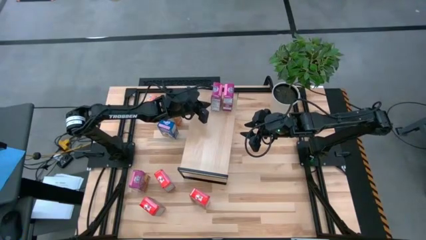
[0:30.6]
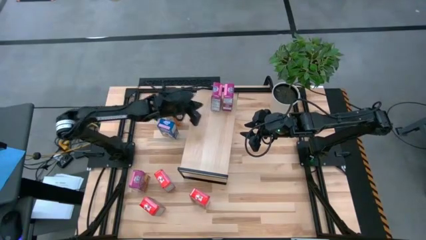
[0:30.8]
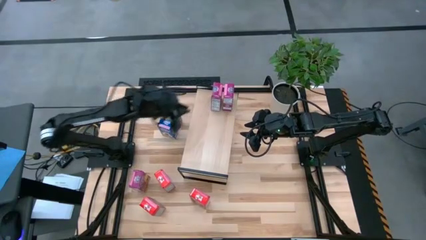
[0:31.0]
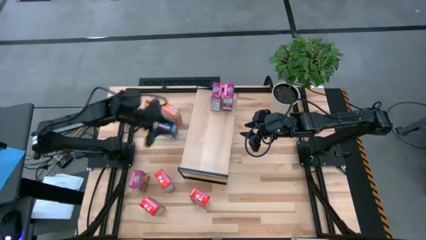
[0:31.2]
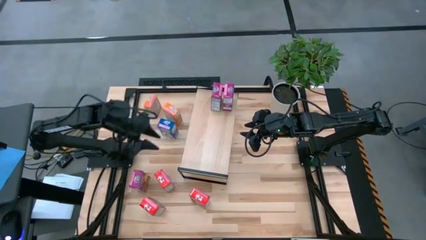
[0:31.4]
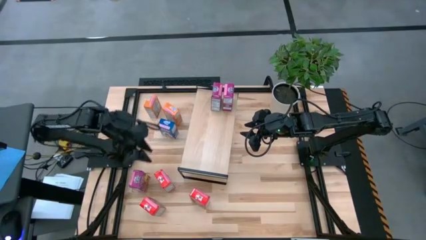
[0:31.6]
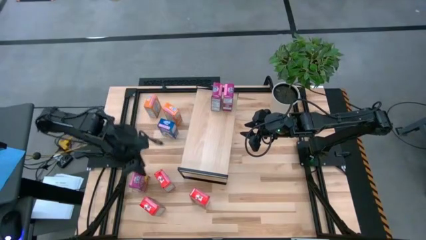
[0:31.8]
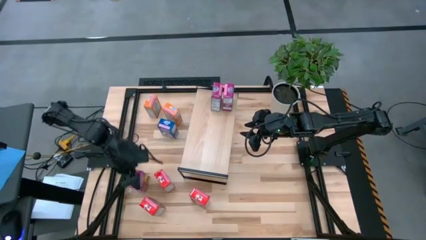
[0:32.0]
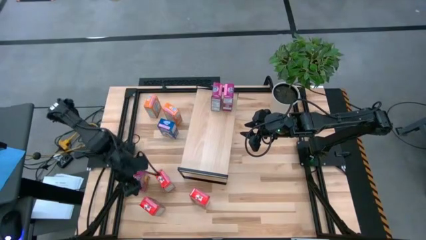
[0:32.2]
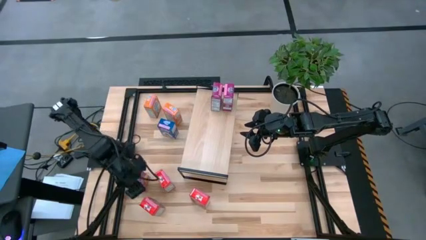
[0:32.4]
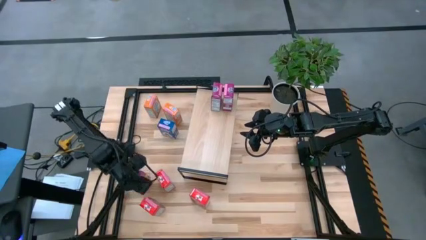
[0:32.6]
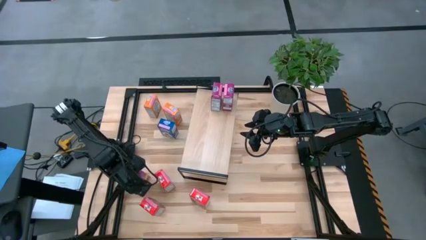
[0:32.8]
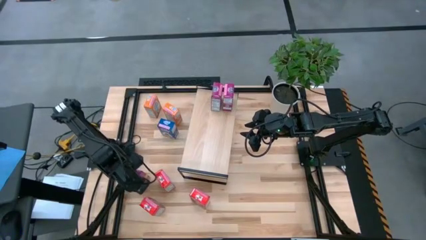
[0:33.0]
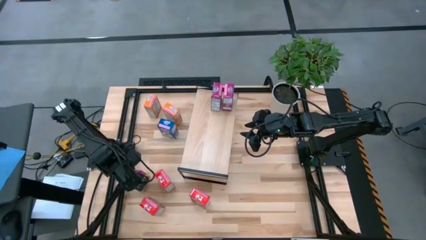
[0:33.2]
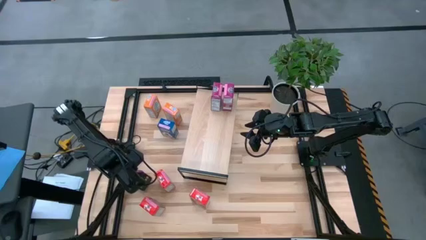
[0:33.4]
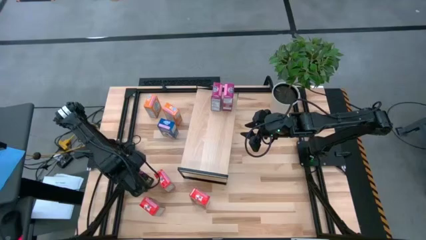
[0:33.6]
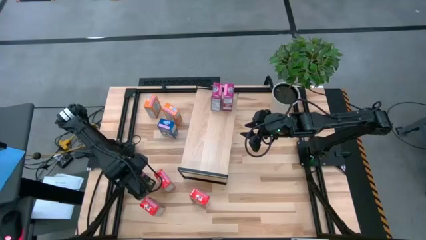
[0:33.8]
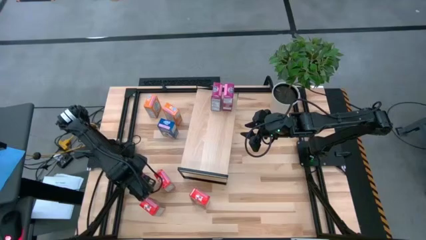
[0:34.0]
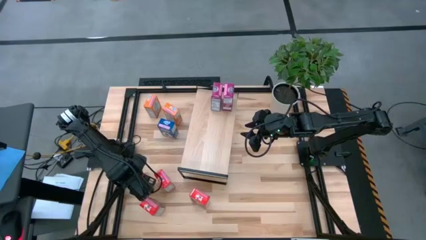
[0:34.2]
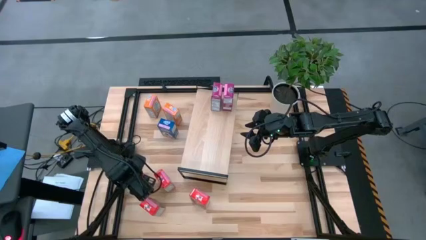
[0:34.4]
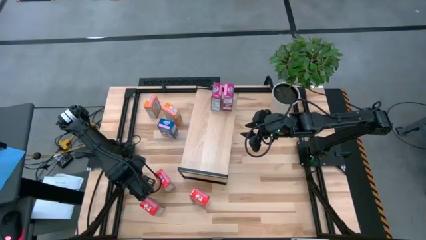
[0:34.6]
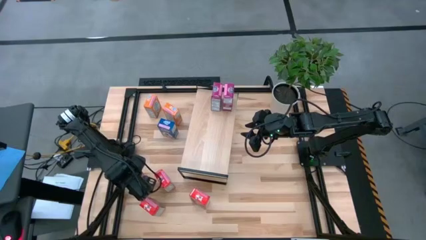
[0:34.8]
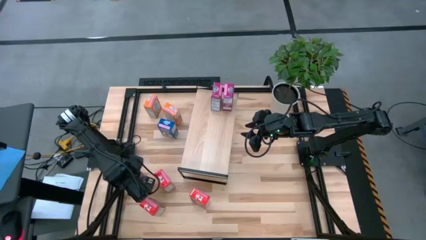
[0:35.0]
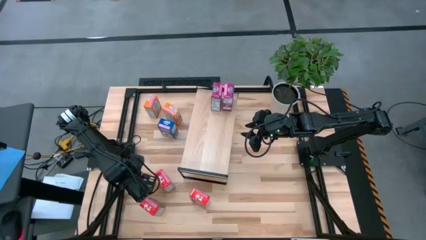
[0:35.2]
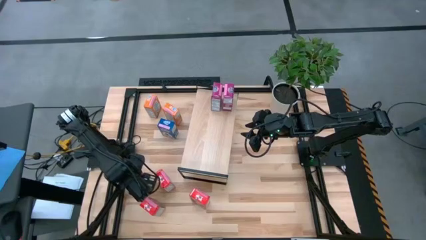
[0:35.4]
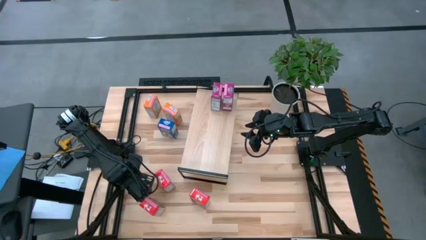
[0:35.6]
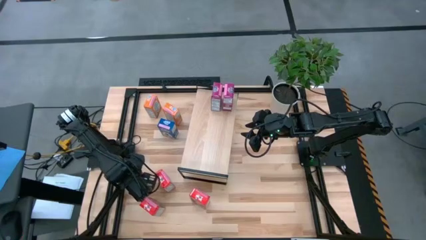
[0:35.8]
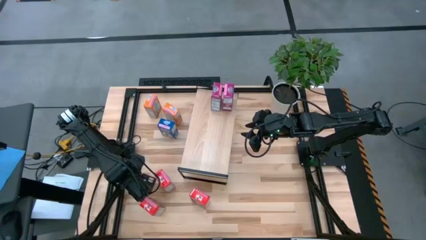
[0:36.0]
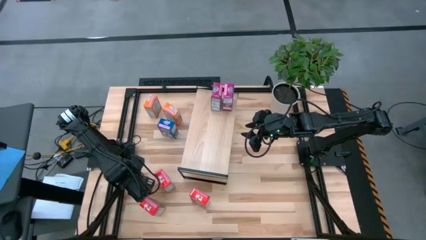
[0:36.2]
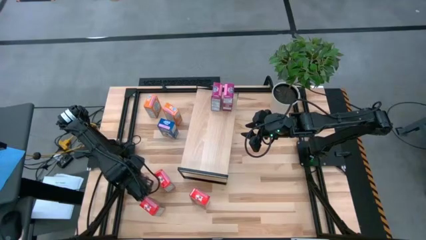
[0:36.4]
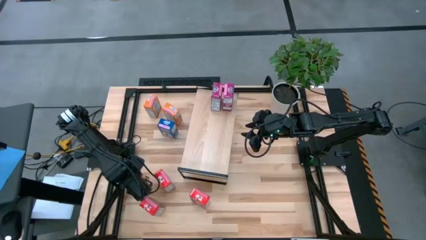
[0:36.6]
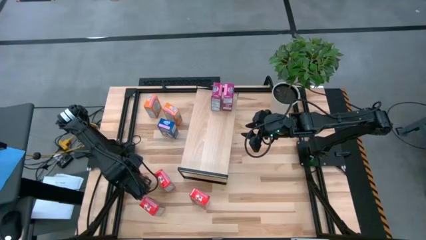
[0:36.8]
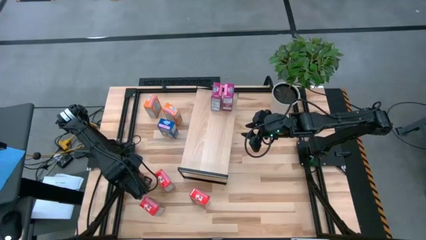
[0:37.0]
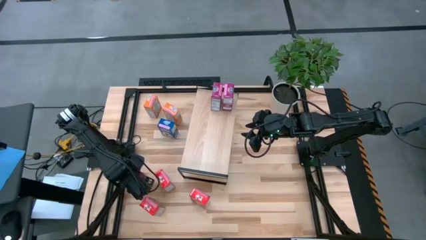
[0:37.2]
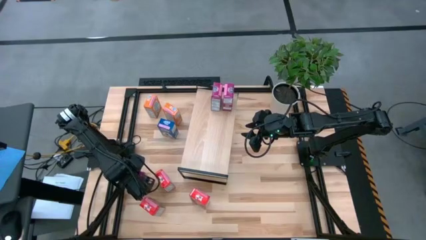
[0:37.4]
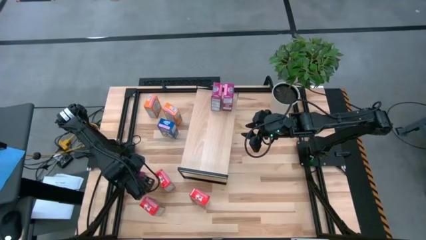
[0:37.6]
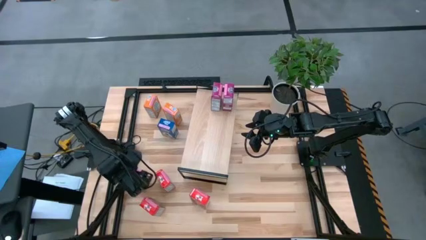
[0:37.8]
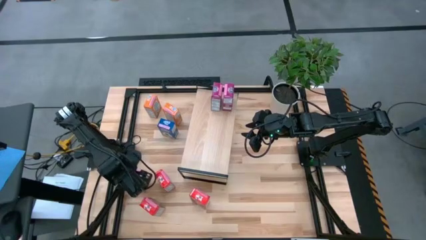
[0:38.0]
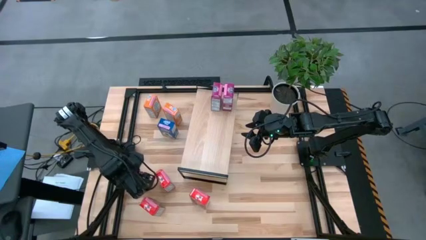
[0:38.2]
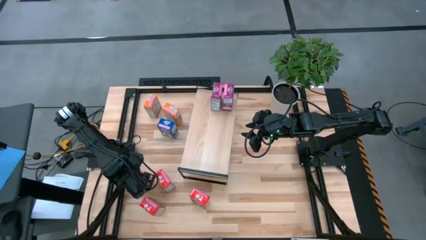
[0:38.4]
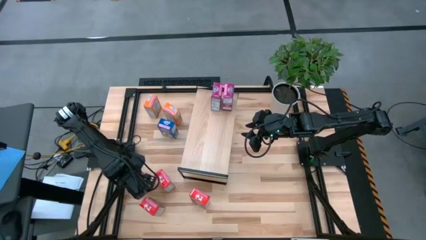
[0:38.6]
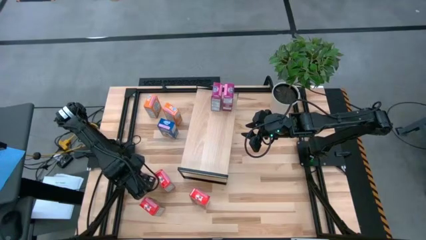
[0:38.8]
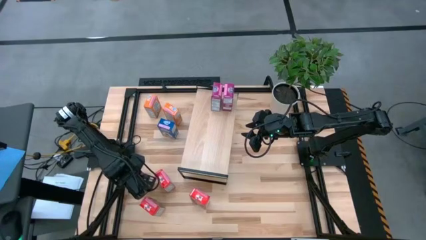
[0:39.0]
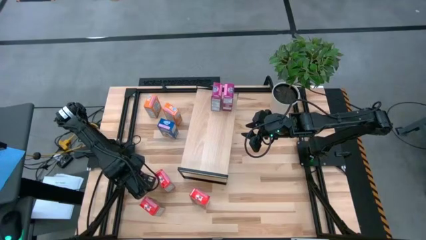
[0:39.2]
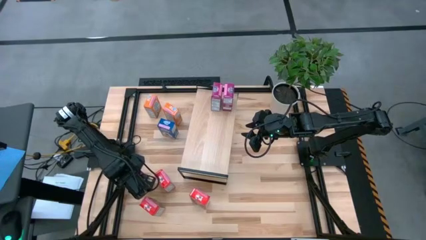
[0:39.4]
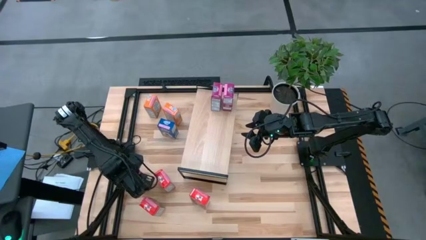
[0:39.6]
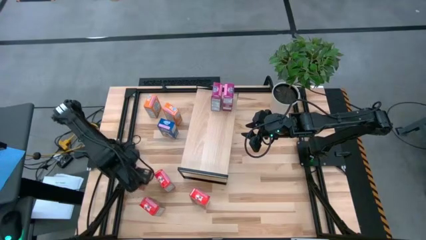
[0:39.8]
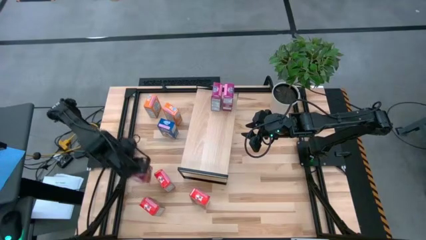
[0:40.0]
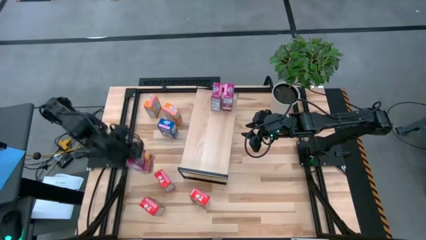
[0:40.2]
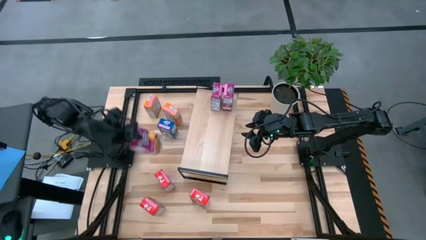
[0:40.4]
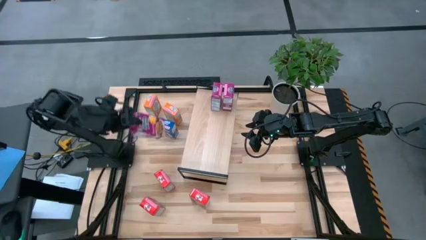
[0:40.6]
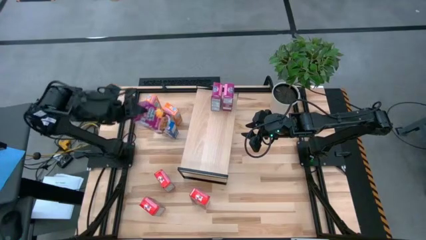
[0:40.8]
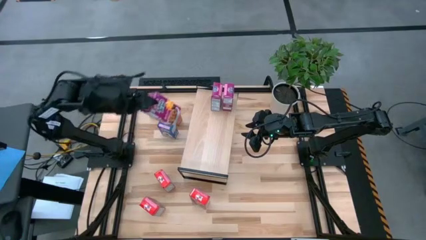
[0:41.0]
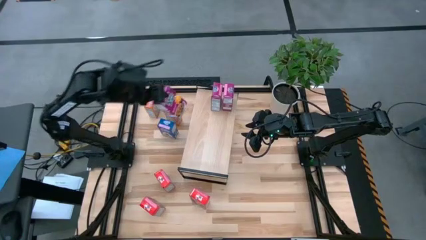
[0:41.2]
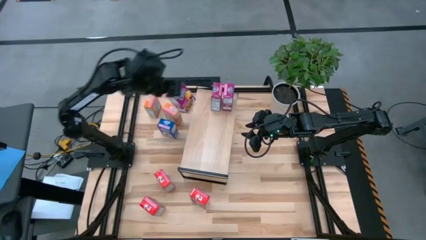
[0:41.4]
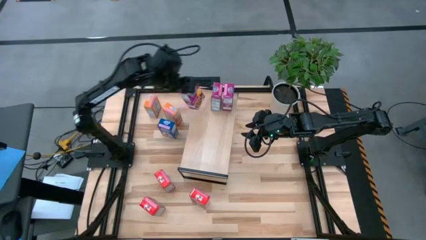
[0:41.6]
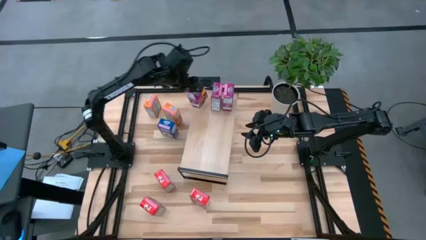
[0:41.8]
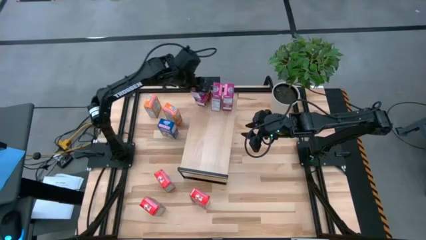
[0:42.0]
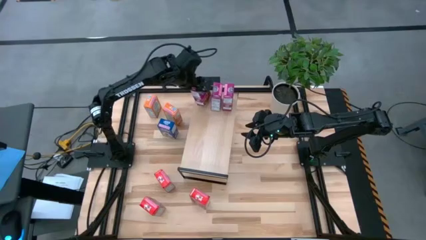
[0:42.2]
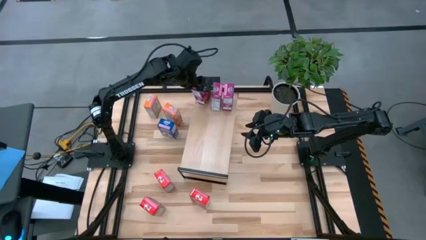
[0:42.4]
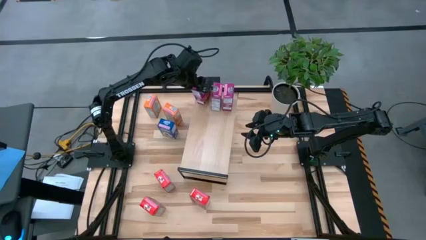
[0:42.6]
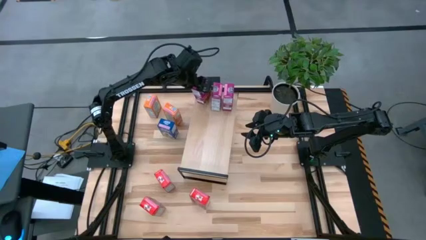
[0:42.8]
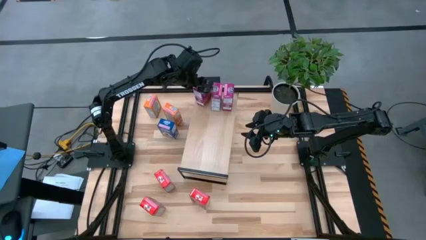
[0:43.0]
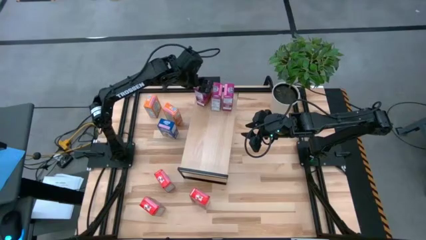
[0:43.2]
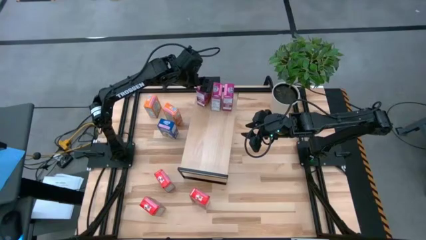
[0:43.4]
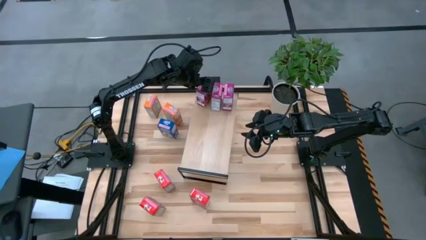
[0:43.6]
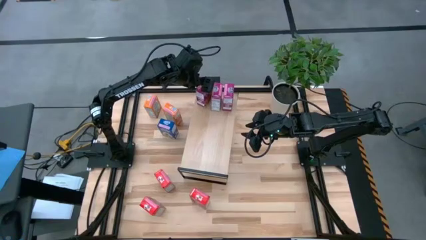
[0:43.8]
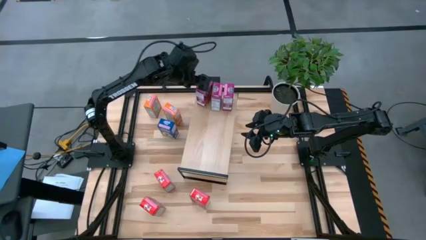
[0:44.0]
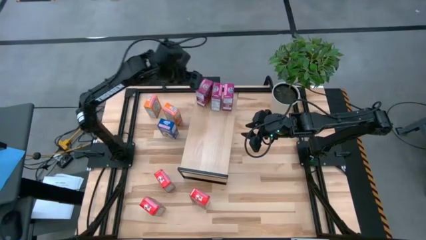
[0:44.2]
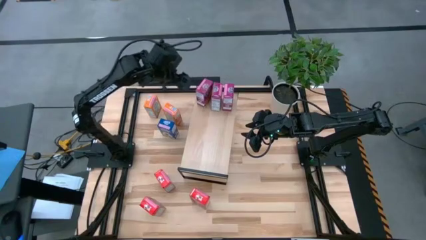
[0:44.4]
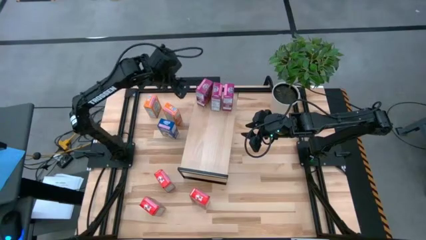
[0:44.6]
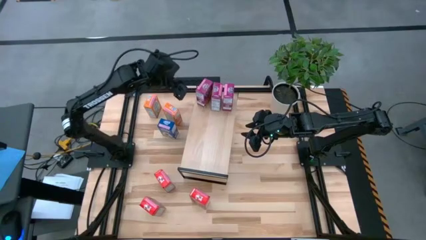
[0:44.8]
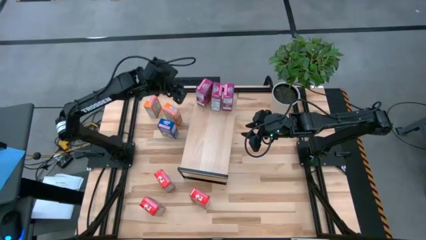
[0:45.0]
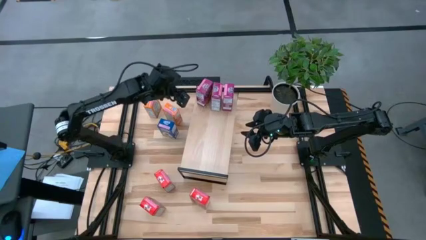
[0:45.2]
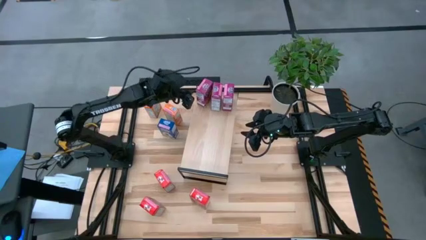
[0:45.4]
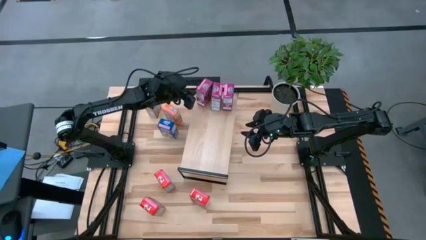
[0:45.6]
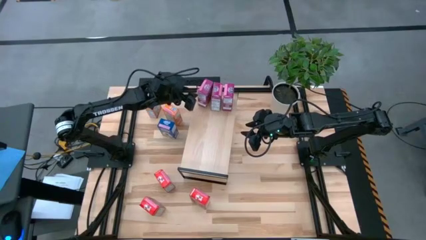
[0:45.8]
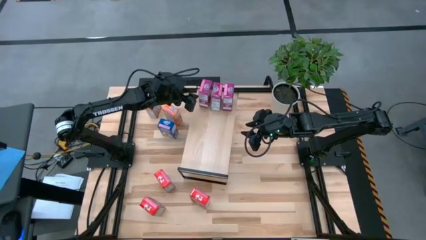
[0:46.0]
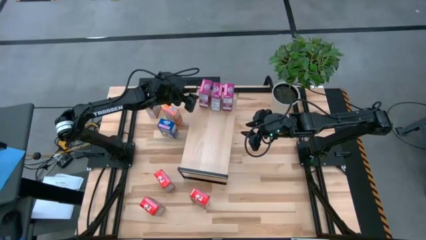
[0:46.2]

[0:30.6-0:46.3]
Task: Stack cereal on shelf
Put the purple cereal box on the shelf
